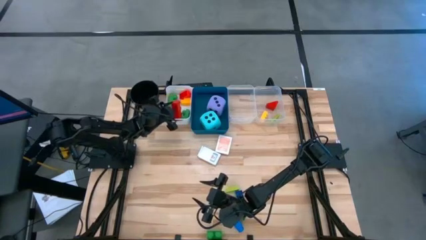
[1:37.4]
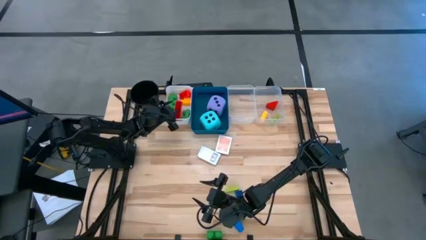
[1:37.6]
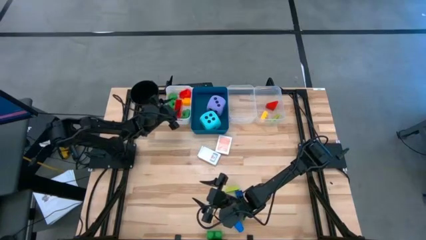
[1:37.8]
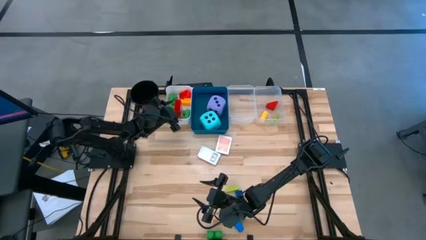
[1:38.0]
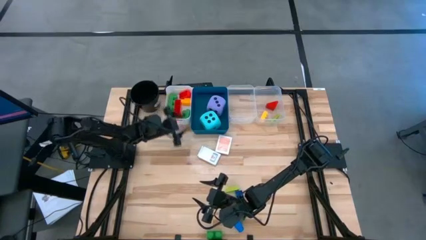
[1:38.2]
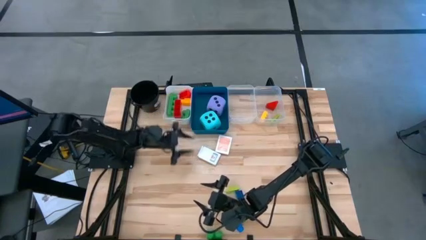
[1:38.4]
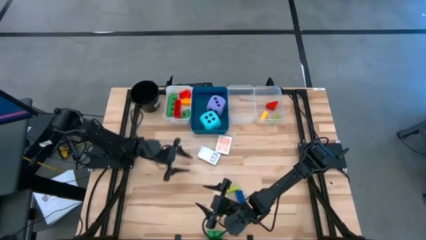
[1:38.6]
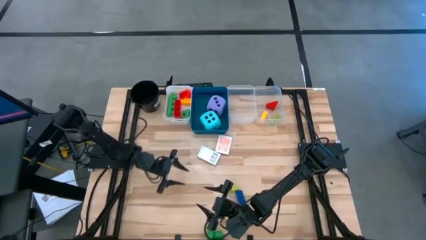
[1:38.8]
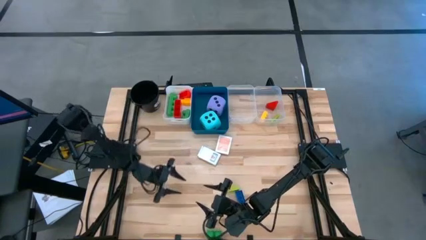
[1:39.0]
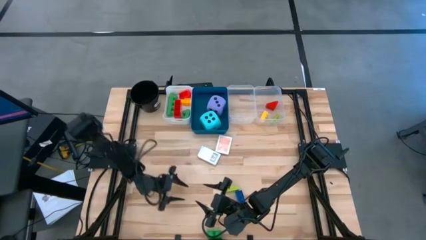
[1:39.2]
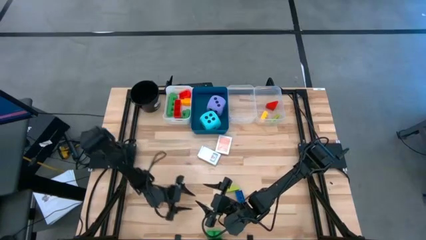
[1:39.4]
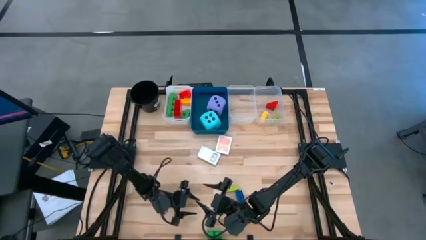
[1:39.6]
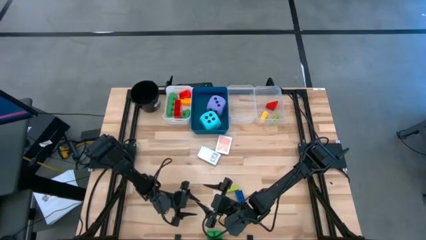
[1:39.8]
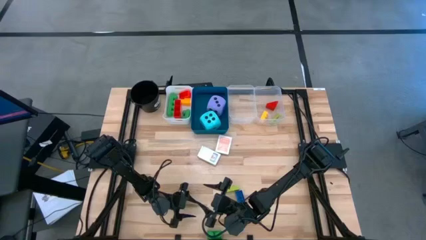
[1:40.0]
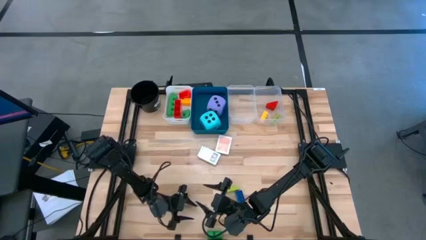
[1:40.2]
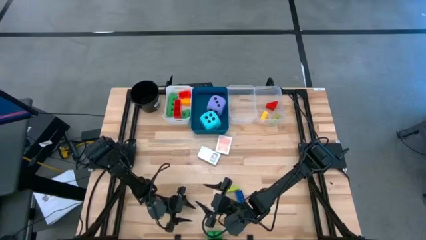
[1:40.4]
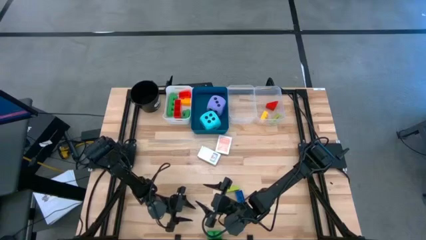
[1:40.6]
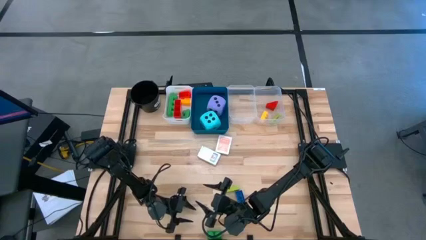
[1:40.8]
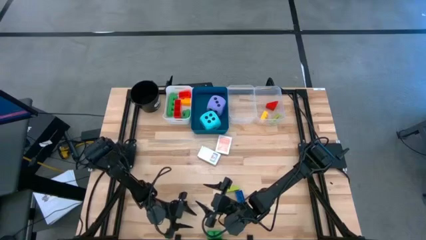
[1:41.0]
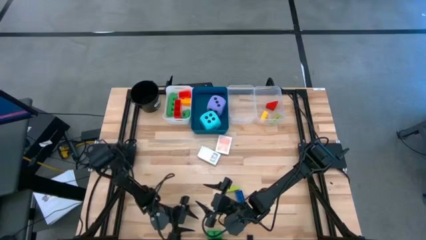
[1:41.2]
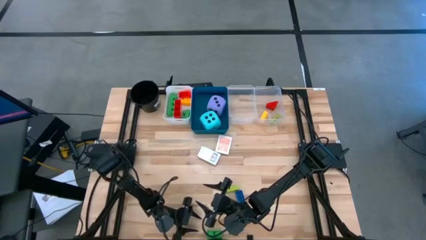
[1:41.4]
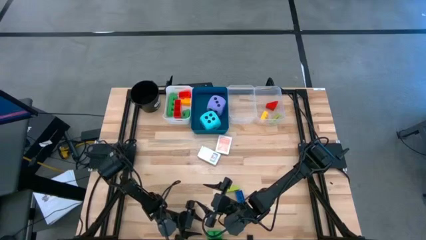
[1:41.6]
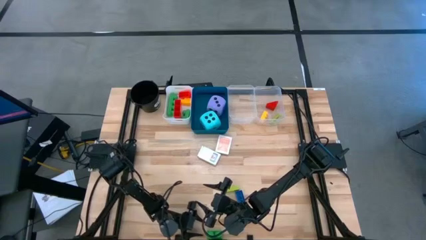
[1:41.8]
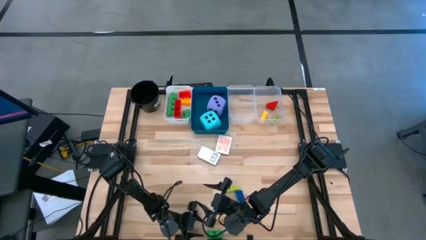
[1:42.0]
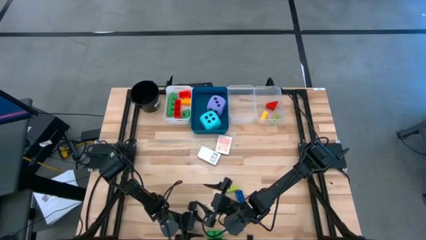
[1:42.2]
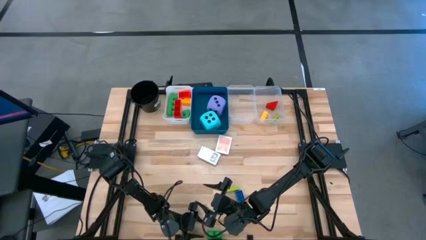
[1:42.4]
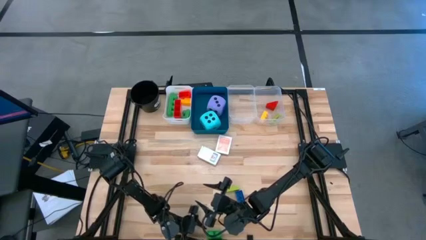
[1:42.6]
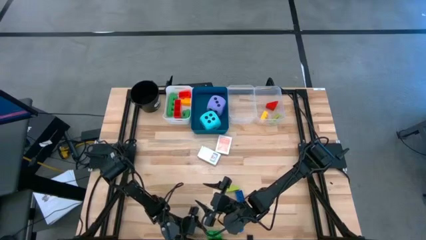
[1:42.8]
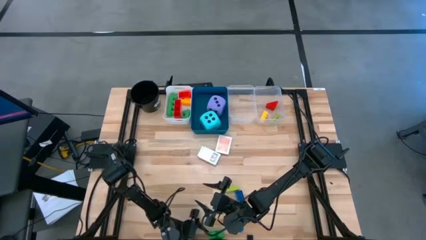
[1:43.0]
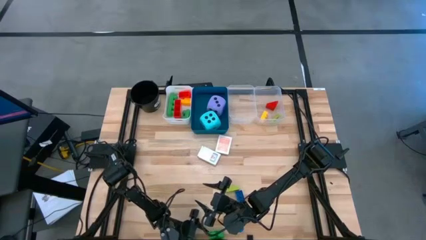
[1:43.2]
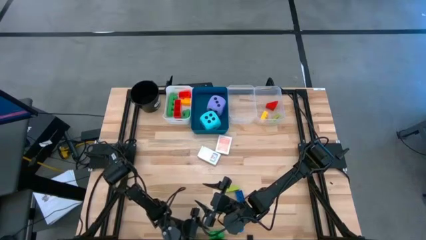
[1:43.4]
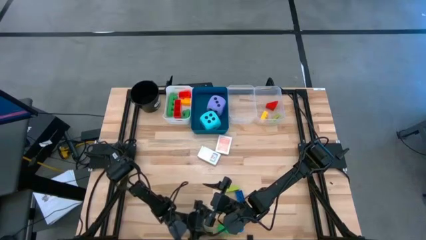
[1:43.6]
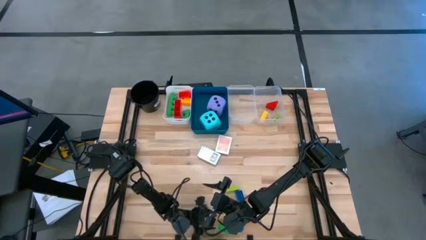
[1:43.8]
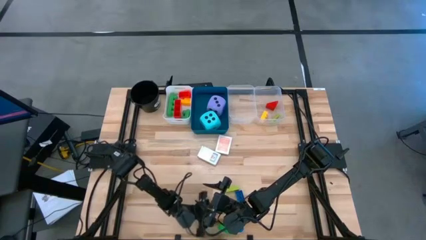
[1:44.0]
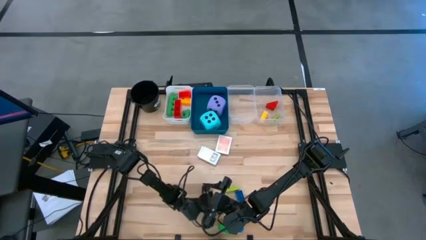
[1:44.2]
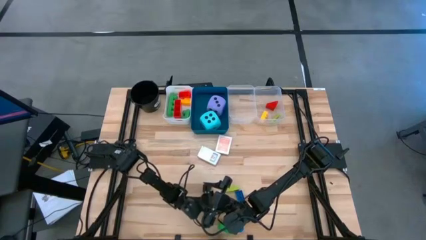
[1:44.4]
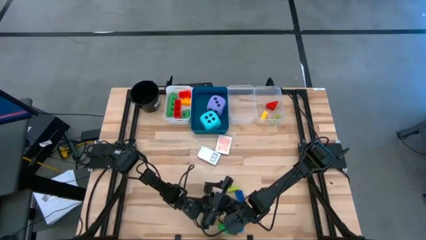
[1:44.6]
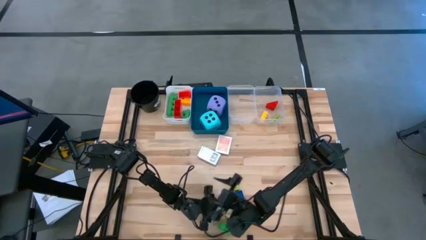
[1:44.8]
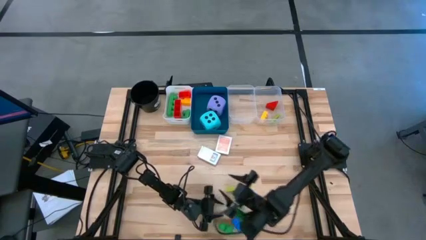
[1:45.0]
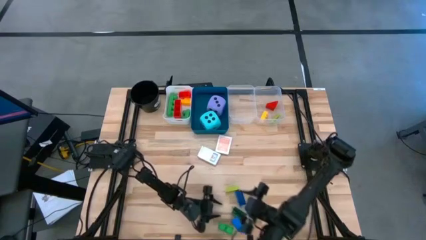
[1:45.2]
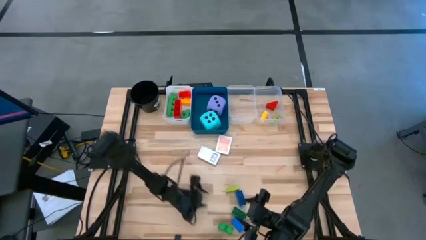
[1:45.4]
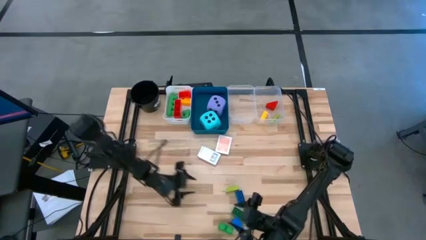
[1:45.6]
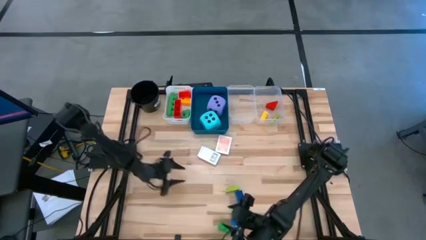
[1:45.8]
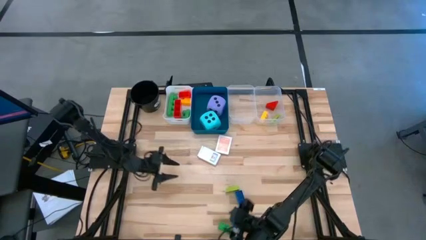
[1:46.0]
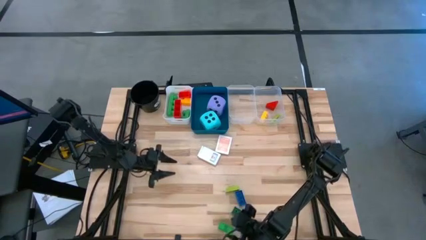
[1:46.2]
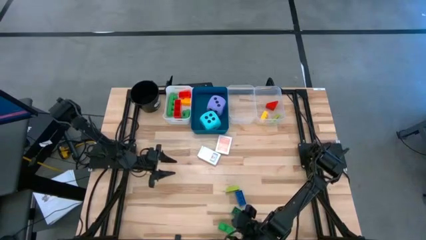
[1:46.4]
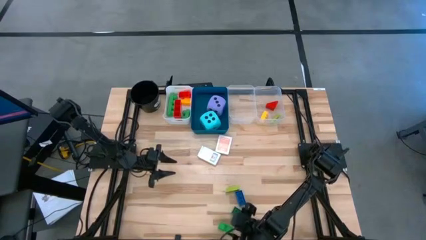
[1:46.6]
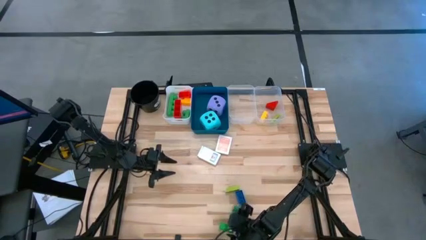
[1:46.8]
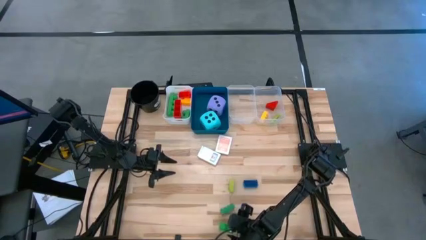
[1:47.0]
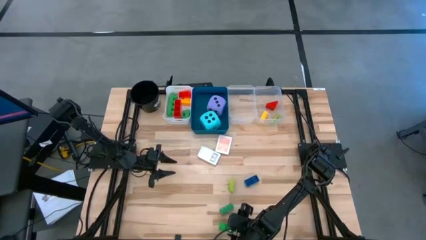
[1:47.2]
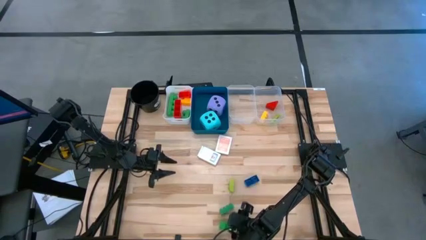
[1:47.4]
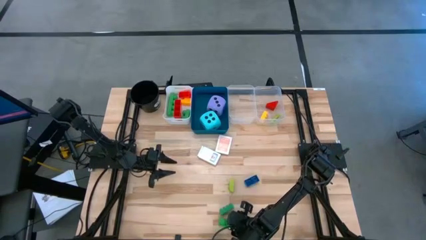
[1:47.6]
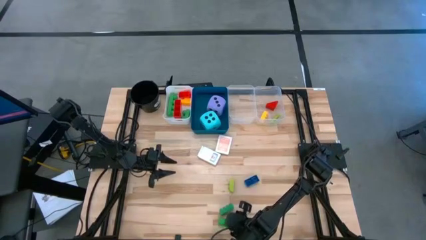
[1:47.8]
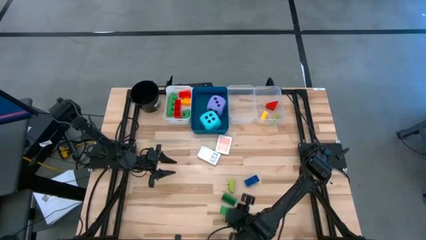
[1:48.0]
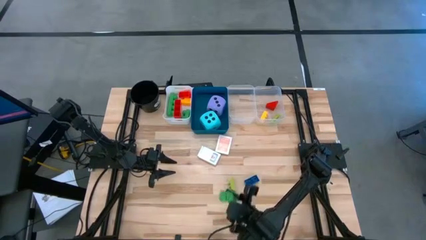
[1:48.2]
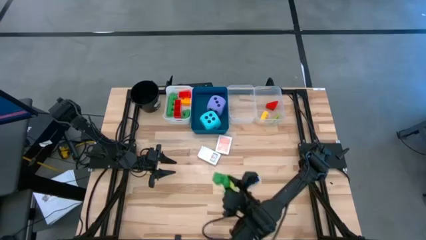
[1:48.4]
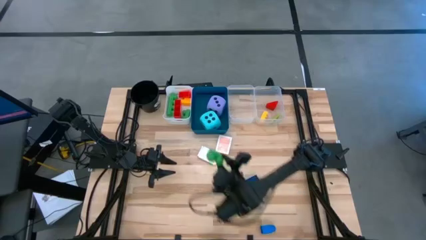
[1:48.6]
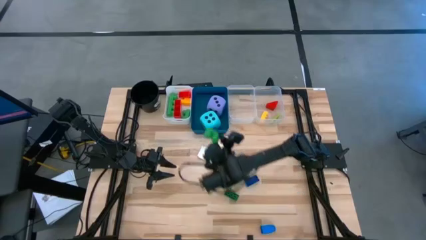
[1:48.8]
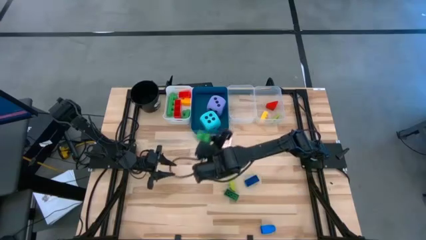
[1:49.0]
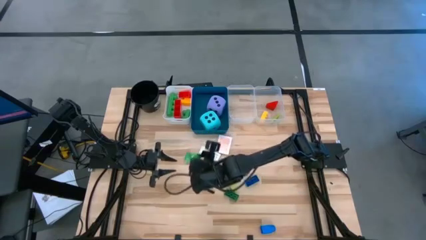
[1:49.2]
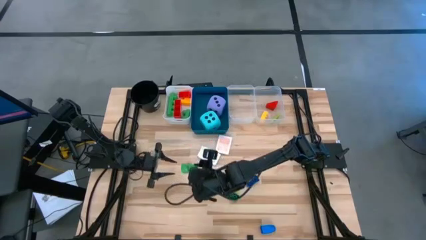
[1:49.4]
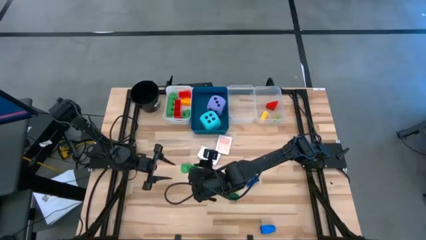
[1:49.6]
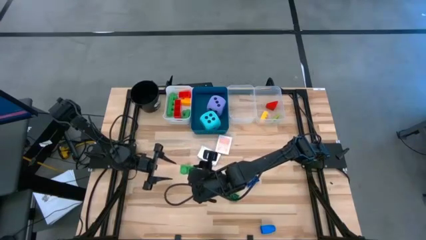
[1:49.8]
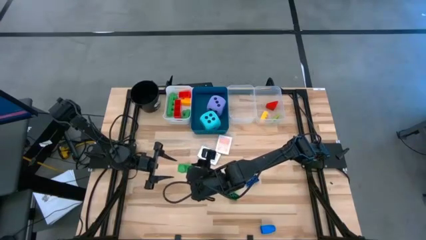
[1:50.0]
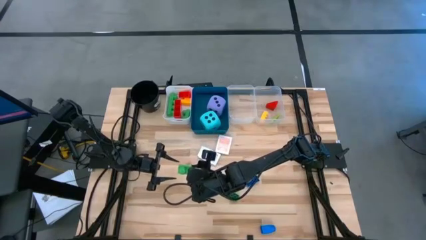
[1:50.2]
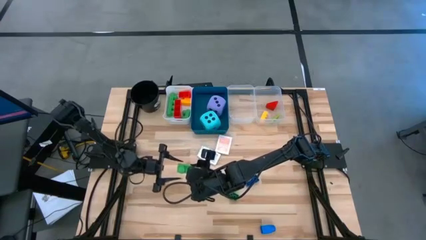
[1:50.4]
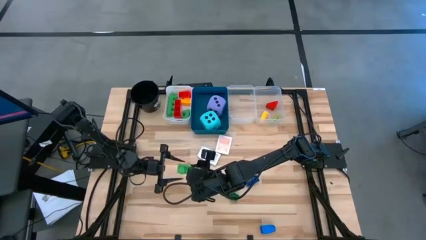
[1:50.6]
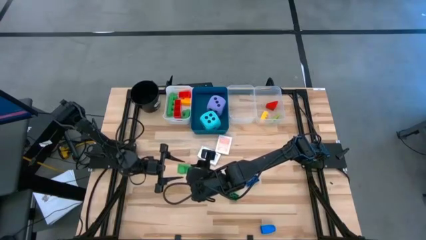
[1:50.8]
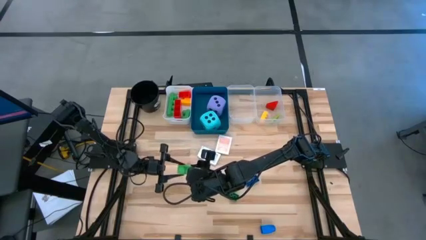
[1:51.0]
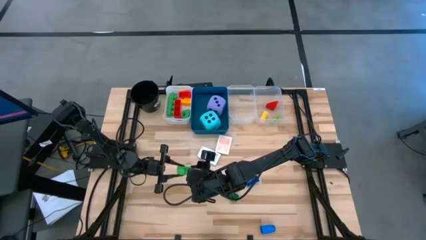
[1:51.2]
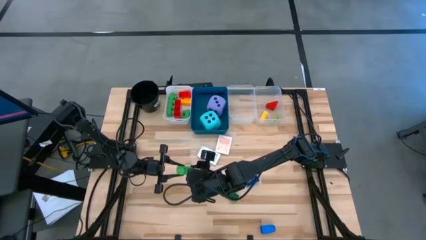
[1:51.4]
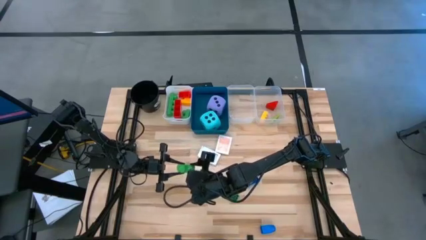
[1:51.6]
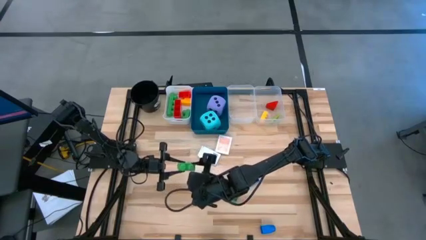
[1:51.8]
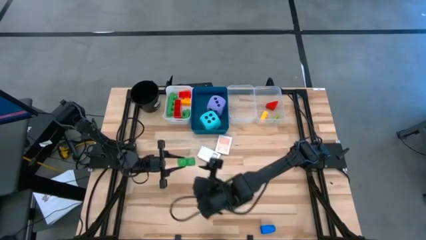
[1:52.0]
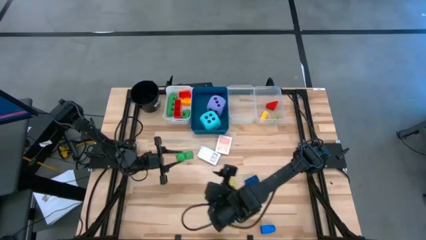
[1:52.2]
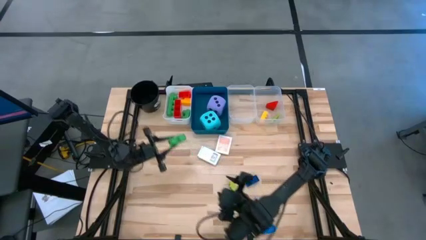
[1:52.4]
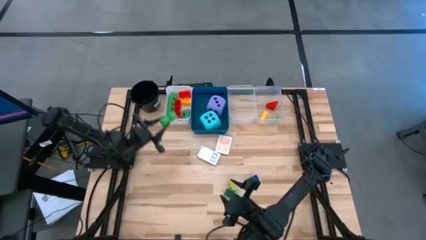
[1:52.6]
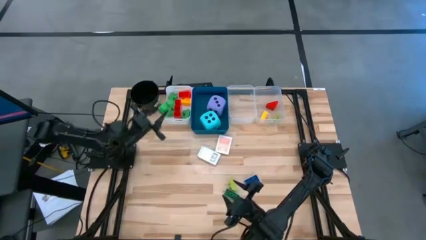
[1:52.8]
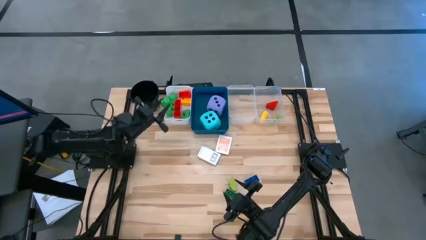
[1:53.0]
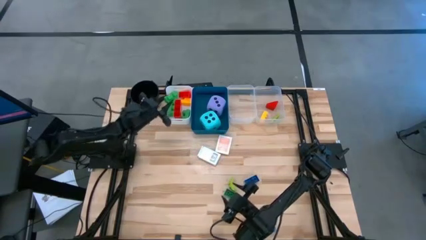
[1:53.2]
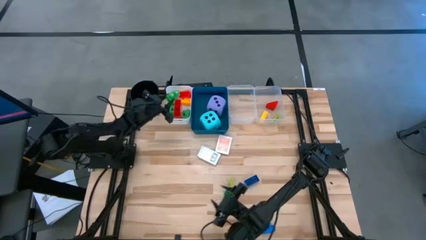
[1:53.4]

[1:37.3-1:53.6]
Task: Pick & Place Toys
Put the large green game piece into the white bin
